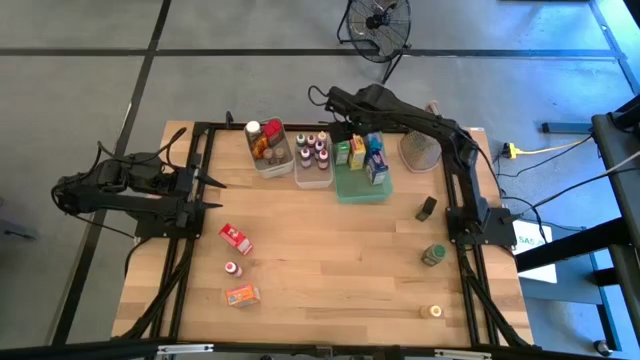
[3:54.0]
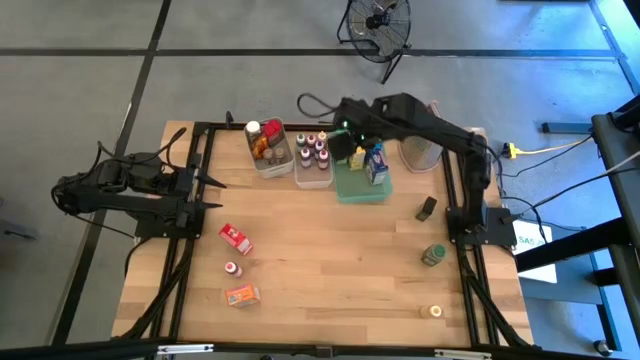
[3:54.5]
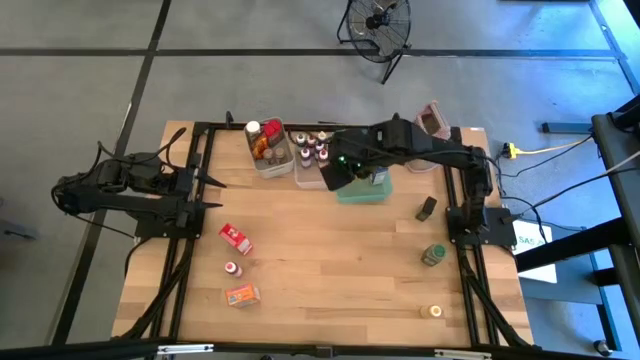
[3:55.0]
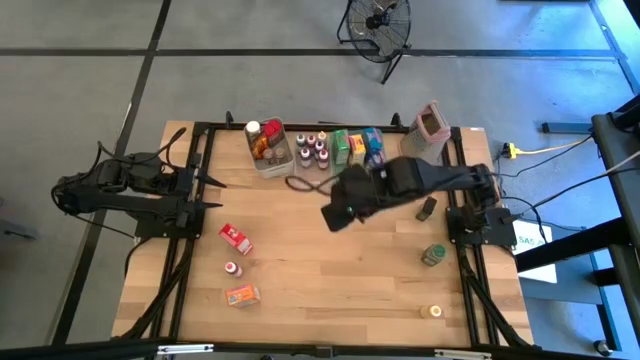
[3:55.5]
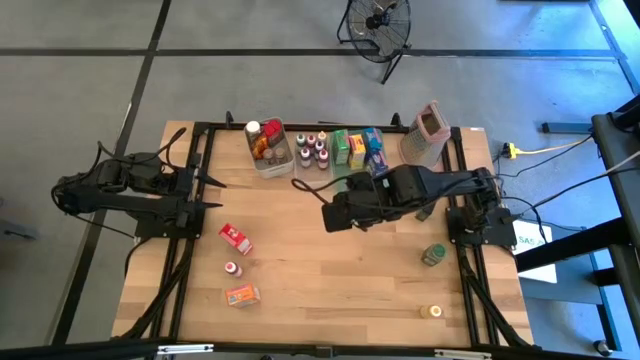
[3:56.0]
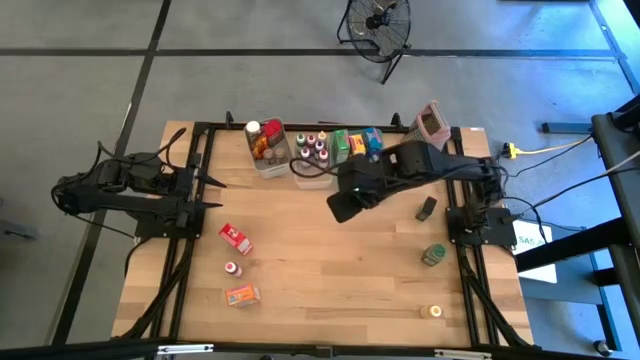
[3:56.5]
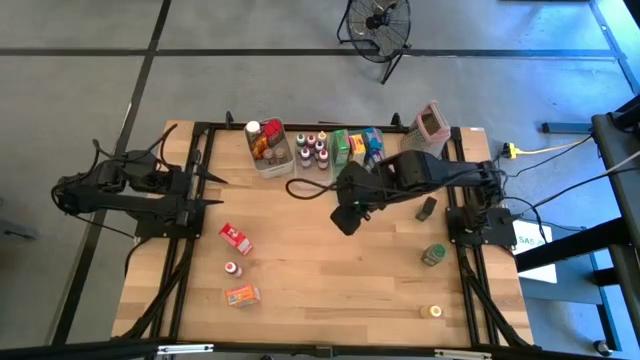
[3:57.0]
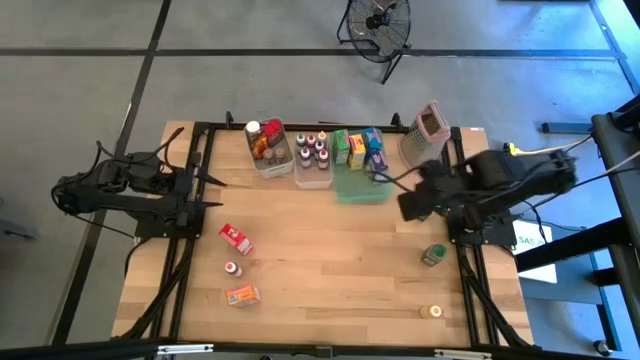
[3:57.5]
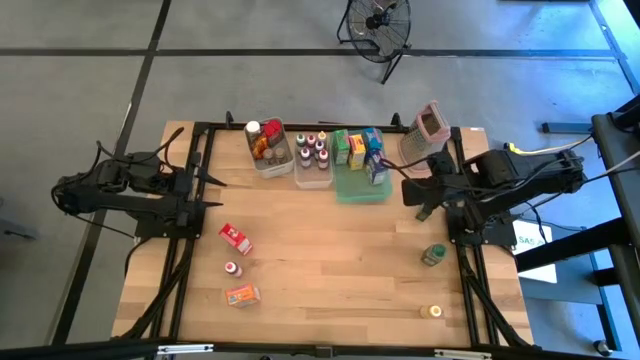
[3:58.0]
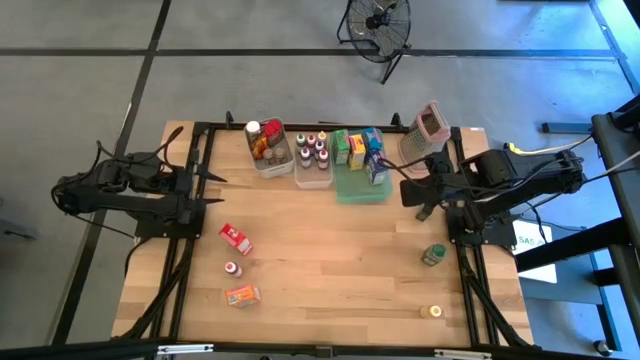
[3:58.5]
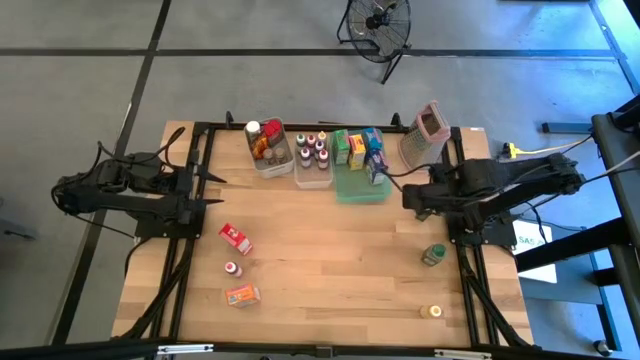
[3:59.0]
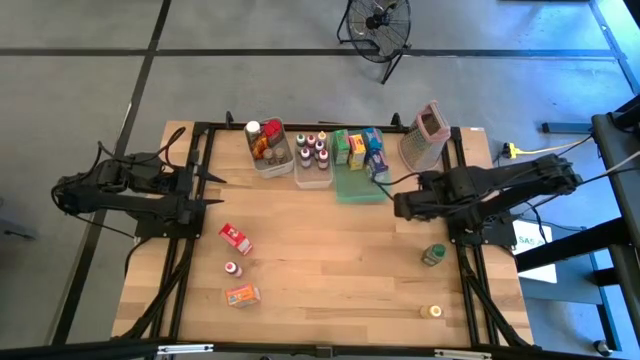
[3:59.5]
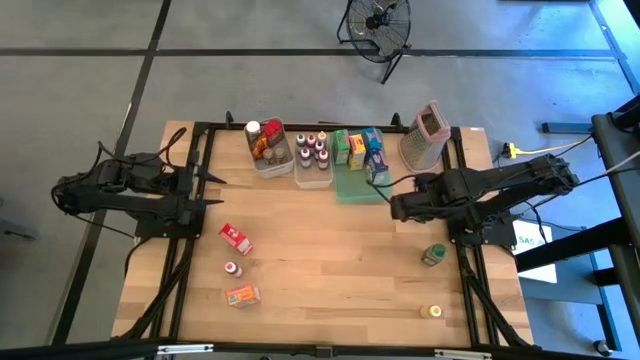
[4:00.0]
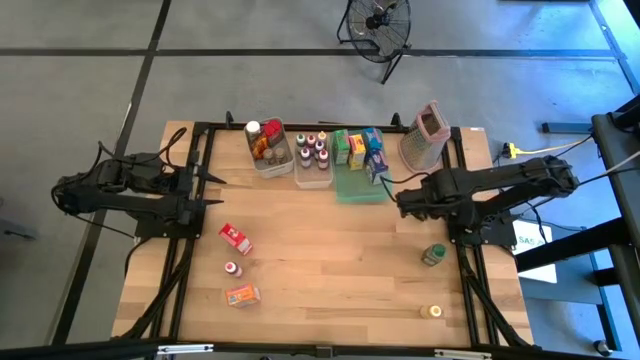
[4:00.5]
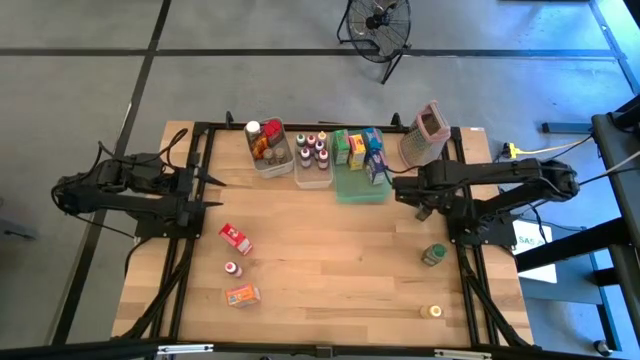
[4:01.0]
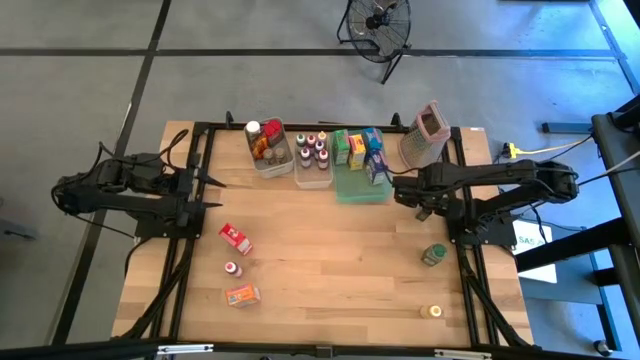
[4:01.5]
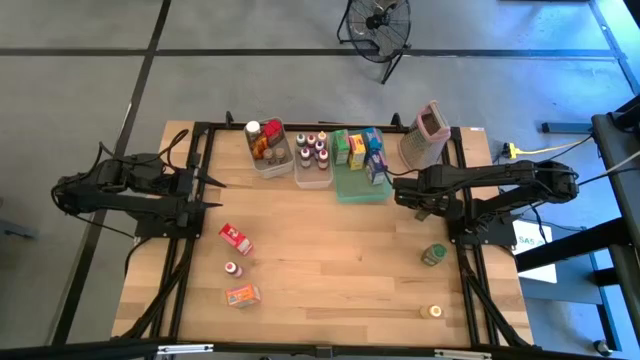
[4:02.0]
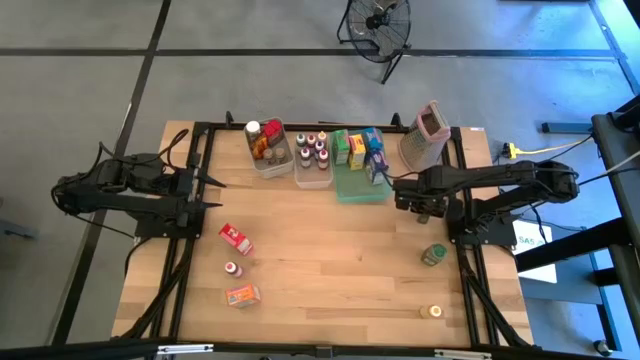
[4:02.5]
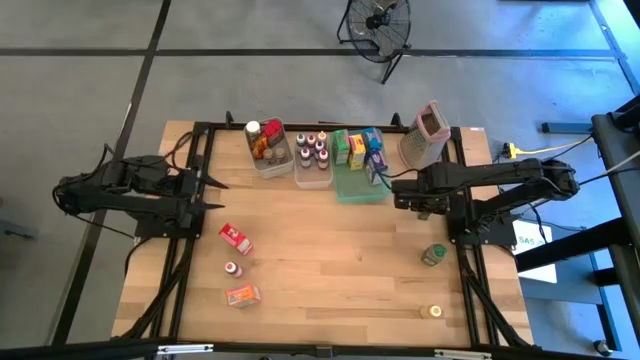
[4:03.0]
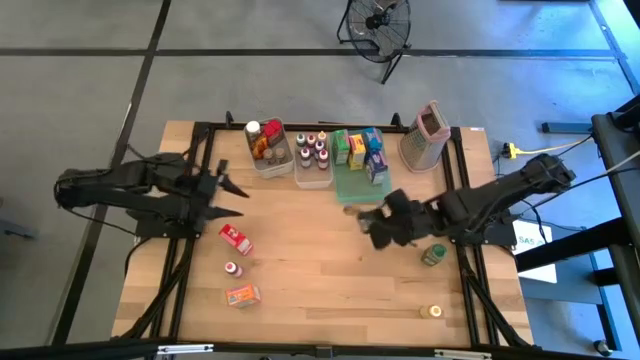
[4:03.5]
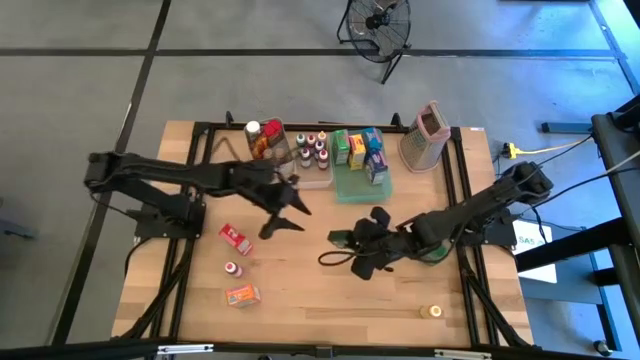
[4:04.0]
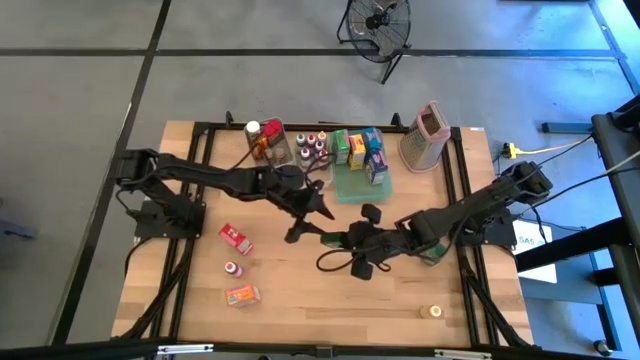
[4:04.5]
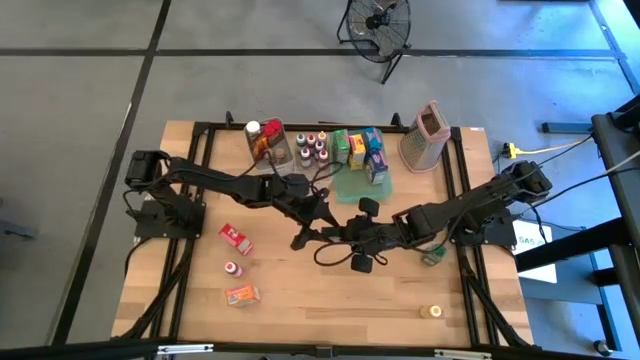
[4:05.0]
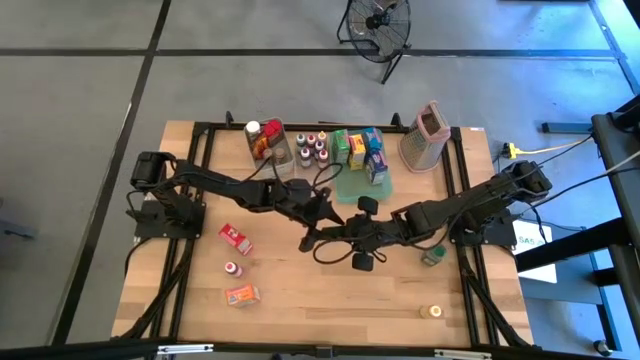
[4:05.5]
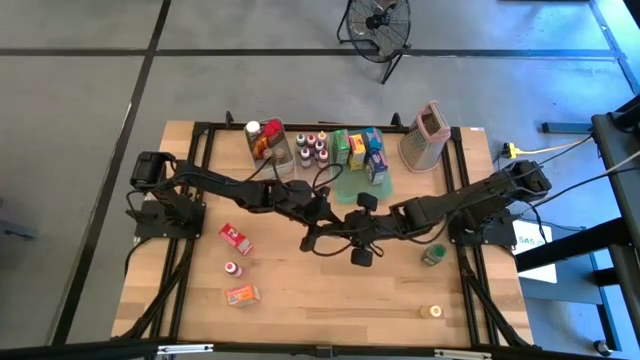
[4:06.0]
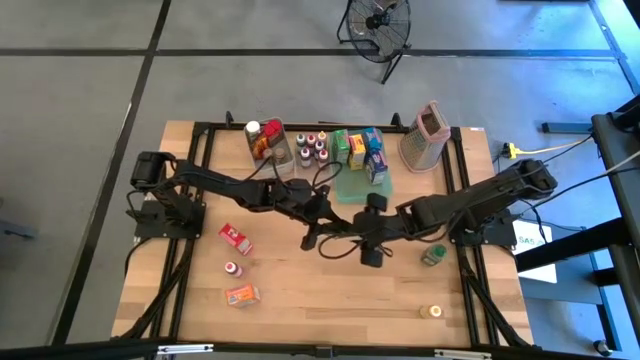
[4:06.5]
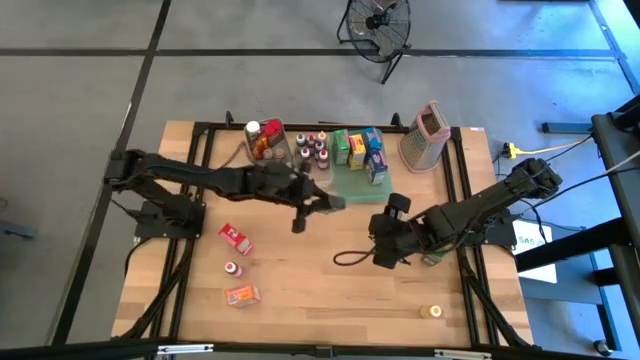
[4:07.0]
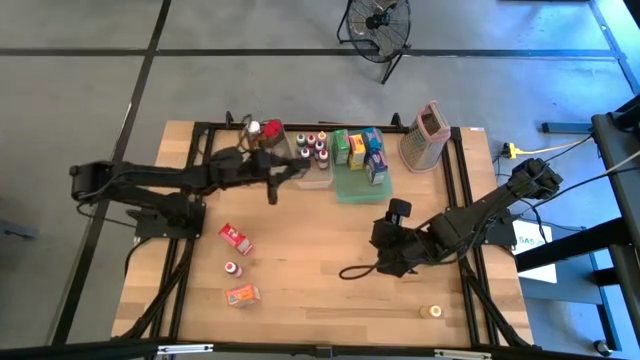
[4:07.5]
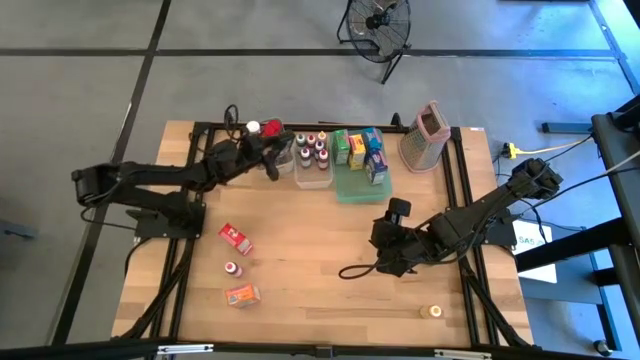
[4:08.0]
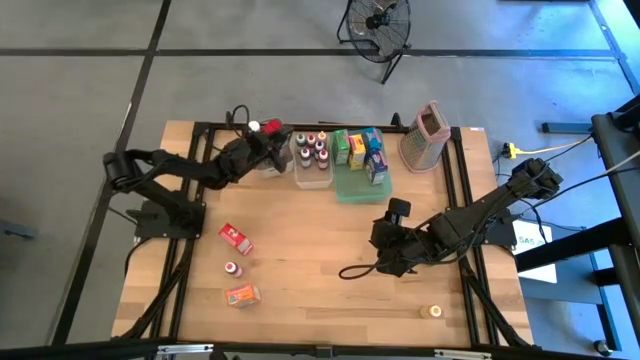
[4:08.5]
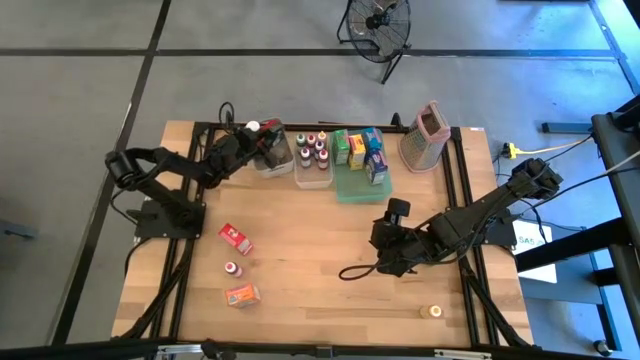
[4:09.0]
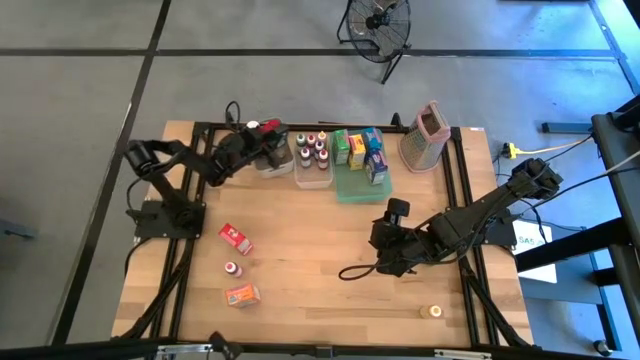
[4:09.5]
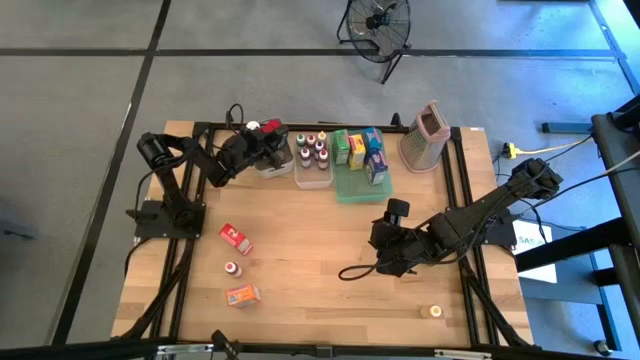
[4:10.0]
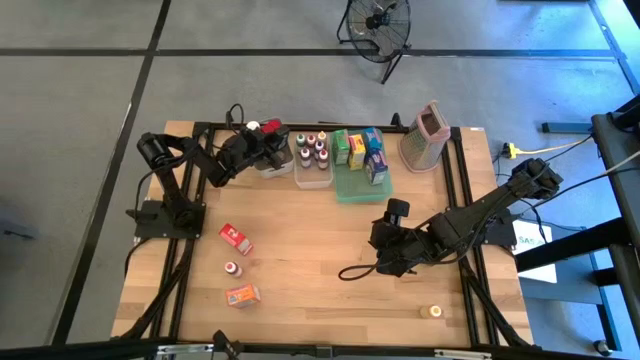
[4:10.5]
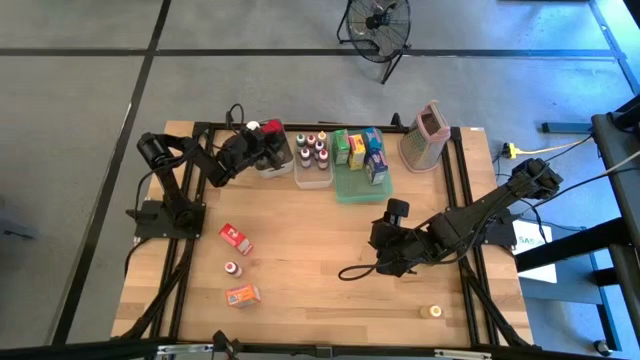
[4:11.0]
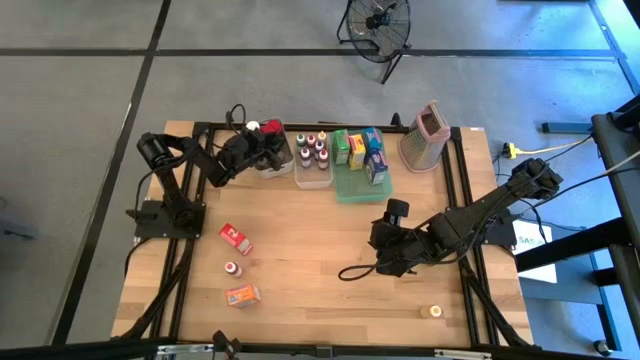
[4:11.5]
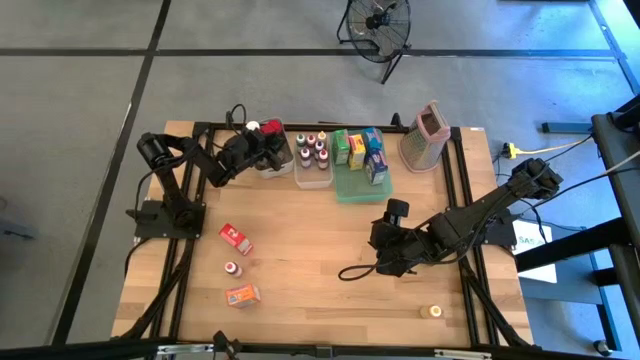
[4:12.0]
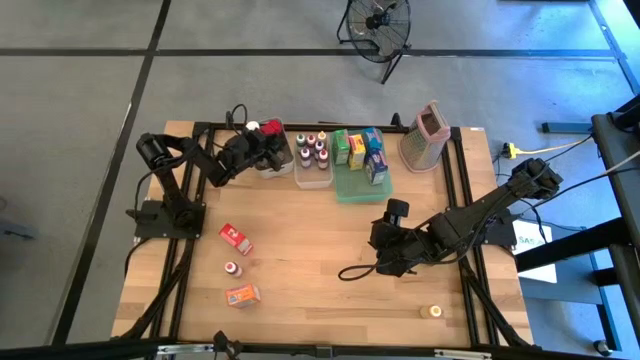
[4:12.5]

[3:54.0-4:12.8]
Task: Pick & Place Kitchen Items
Put the black seasoning can into the gray bin

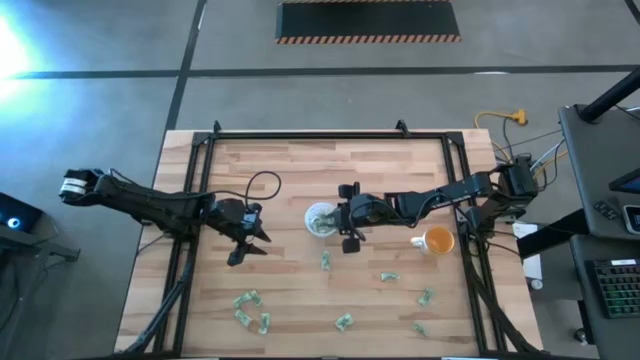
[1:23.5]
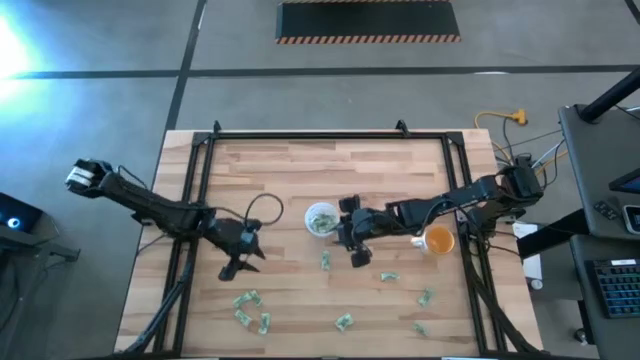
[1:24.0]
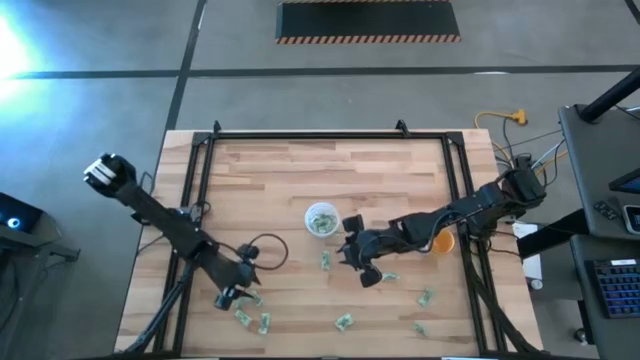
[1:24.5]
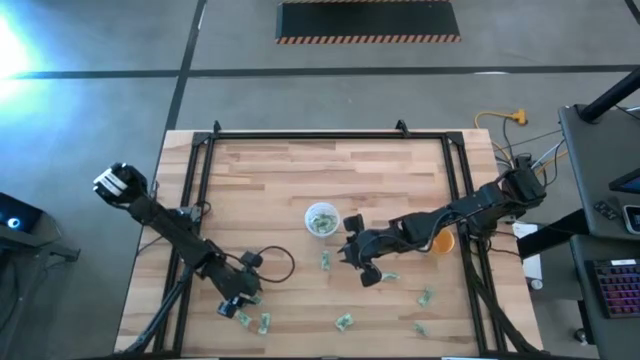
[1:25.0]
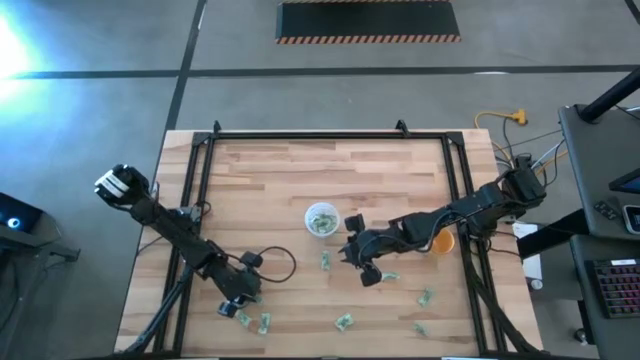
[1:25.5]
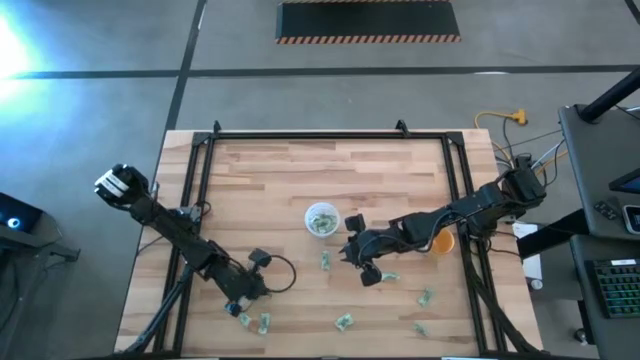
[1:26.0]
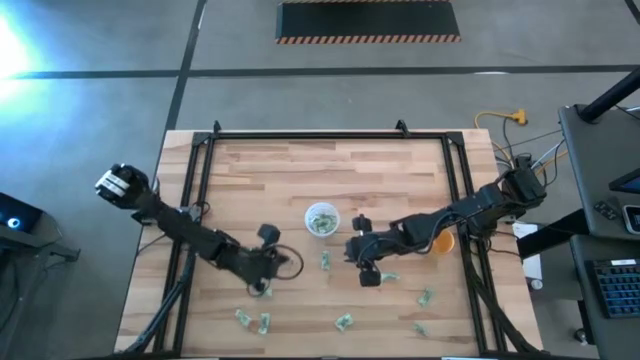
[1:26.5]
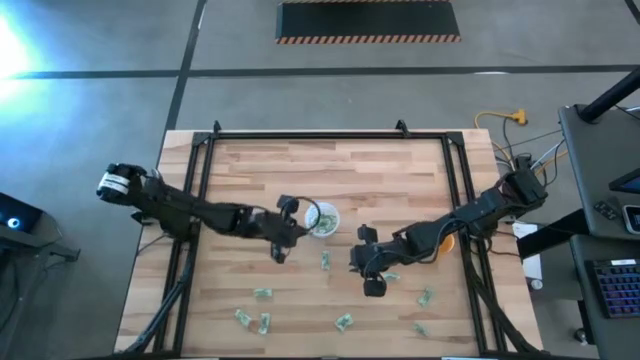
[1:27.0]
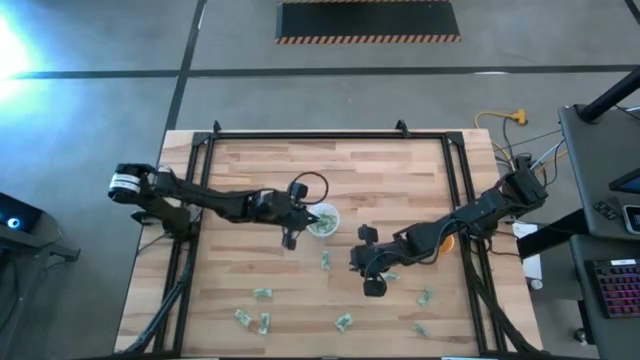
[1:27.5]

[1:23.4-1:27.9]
Task: Pick and place Stevia / Truvia into bins
Put the light green stevia packet into the transparent container
